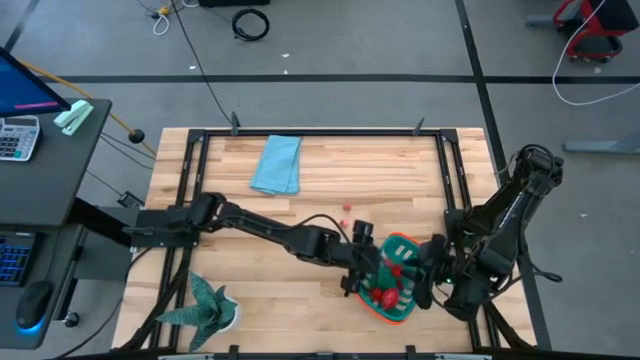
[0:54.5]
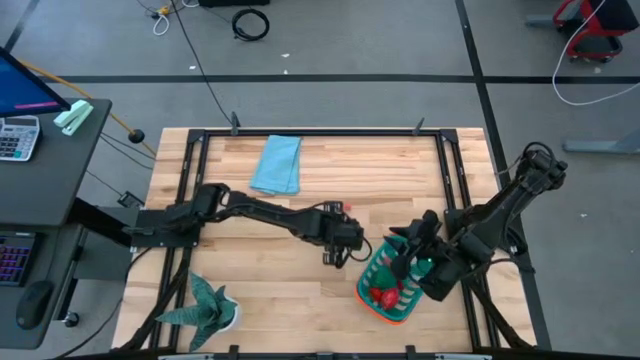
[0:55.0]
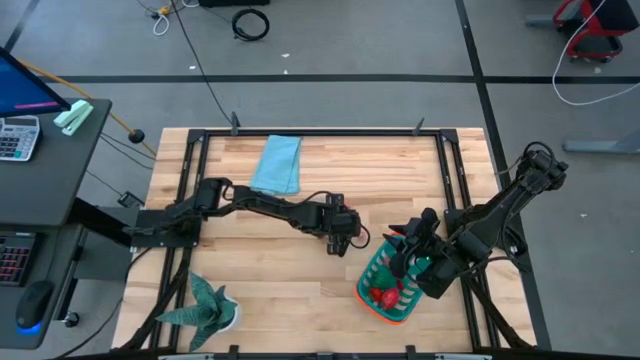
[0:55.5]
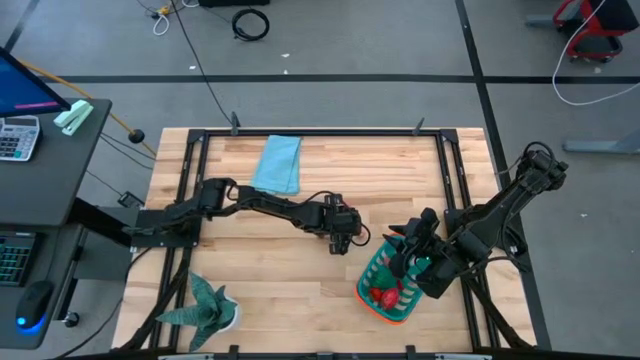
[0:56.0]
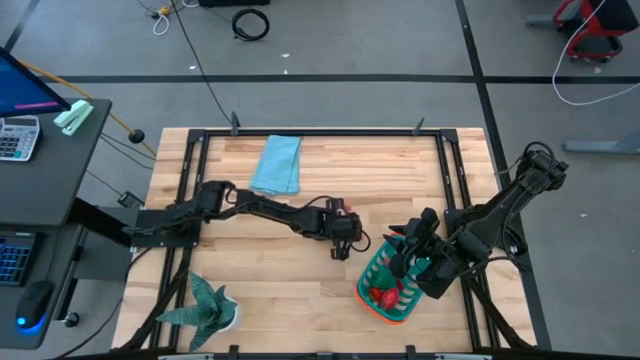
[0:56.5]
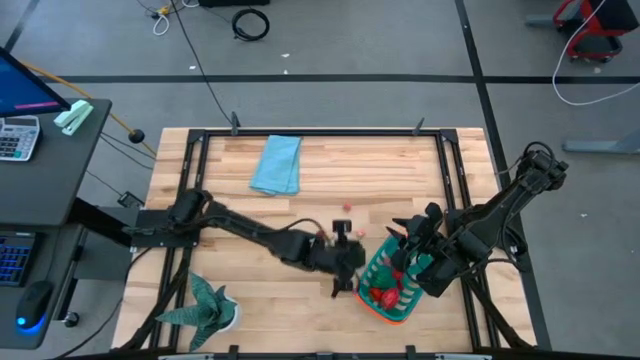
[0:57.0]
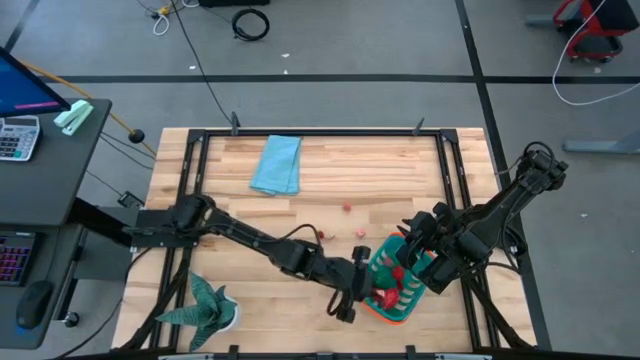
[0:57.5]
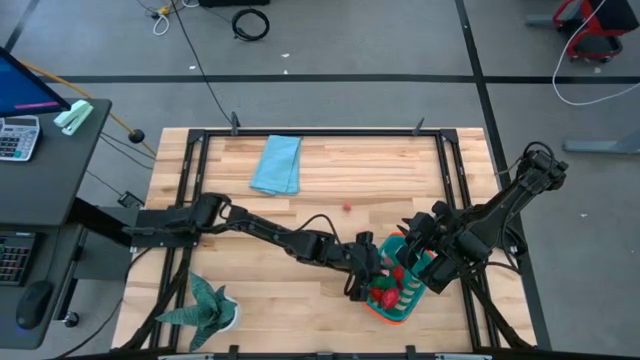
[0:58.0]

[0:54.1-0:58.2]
Task: Pick and placing Produce into tupperware
Put the pink peach into the blue basket

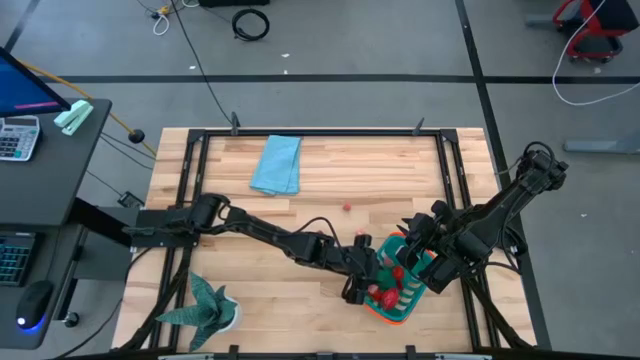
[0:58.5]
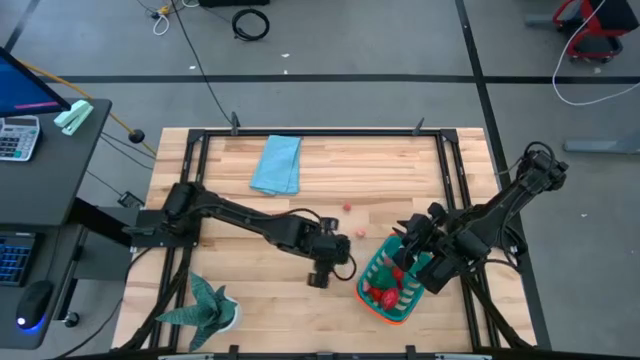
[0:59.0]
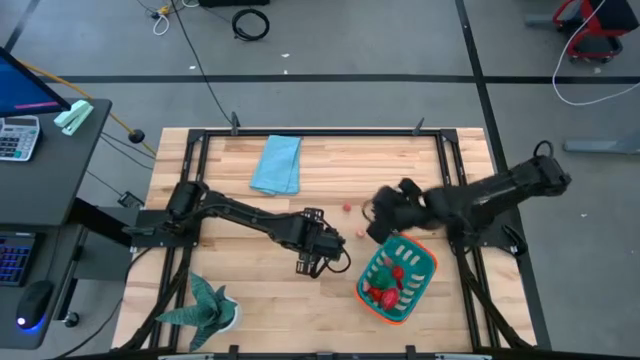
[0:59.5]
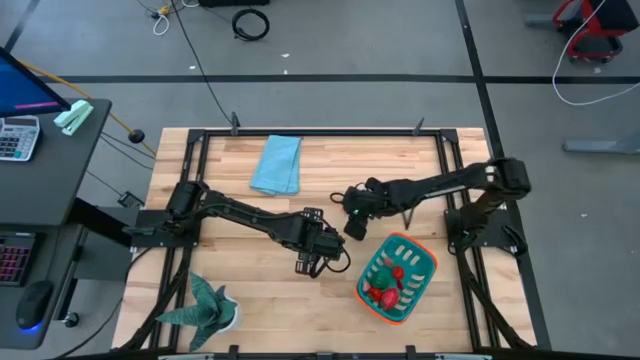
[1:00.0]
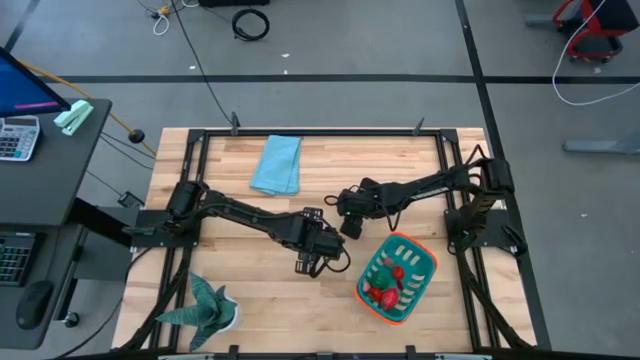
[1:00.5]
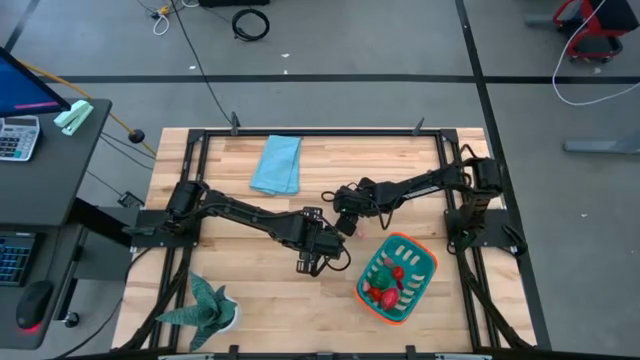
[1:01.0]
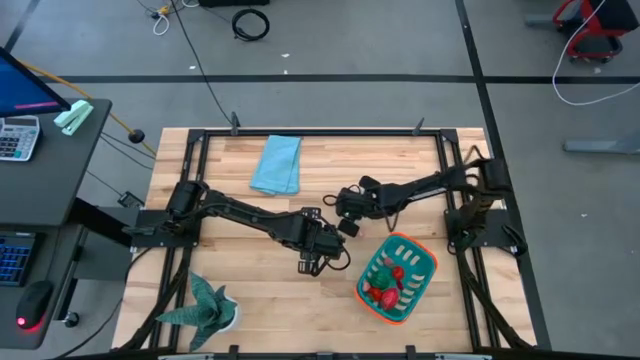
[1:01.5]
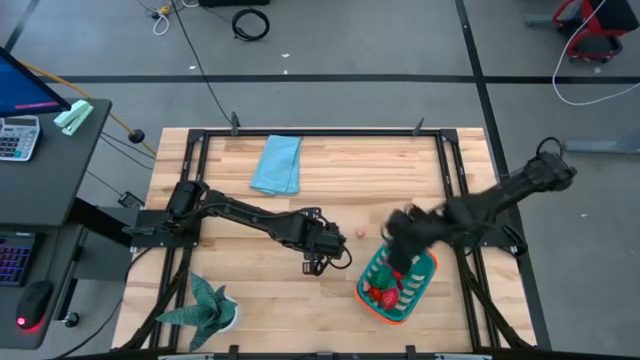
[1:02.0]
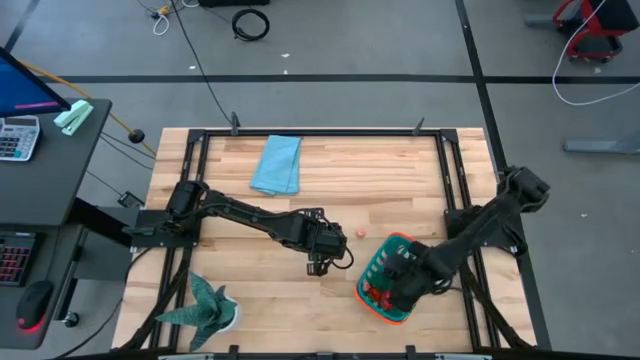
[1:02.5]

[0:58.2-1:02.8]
Put the pink peach into the blue basket

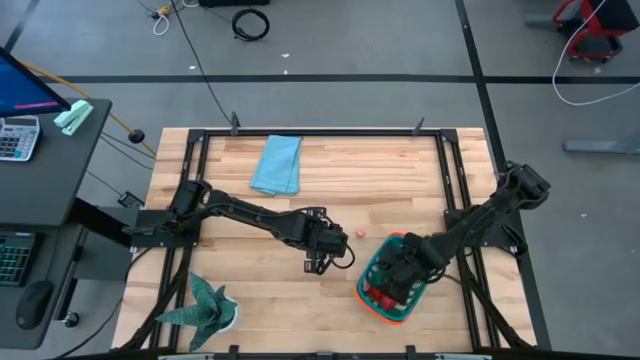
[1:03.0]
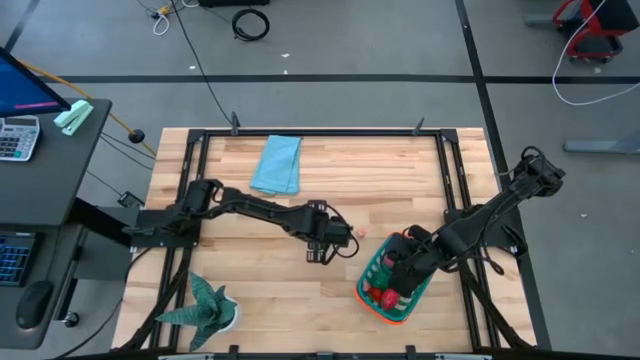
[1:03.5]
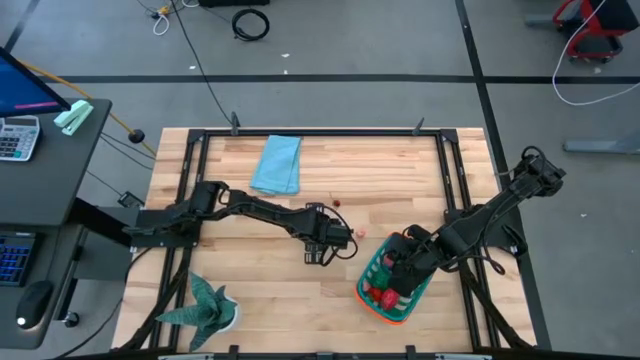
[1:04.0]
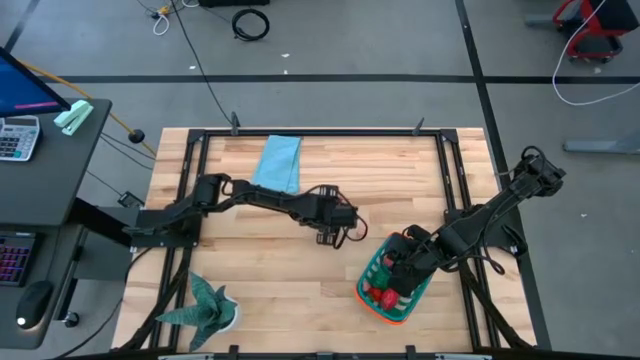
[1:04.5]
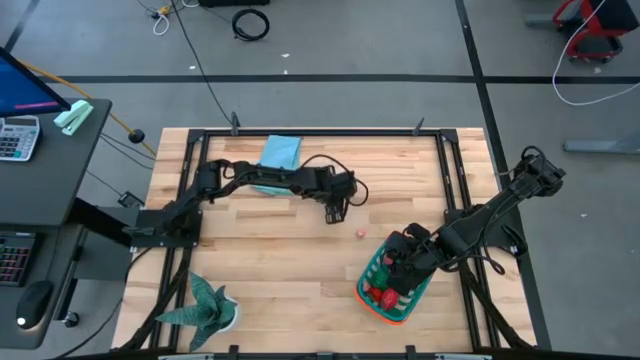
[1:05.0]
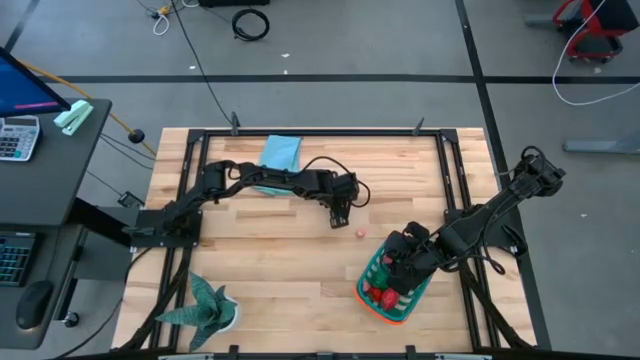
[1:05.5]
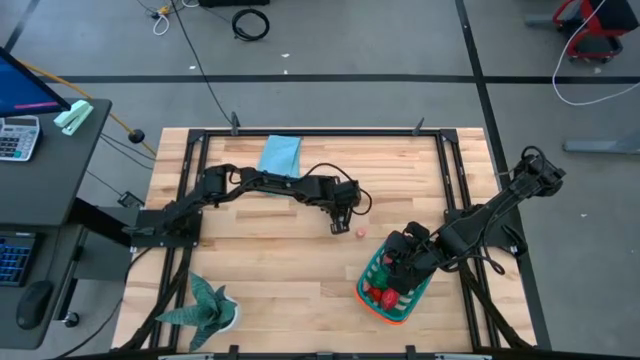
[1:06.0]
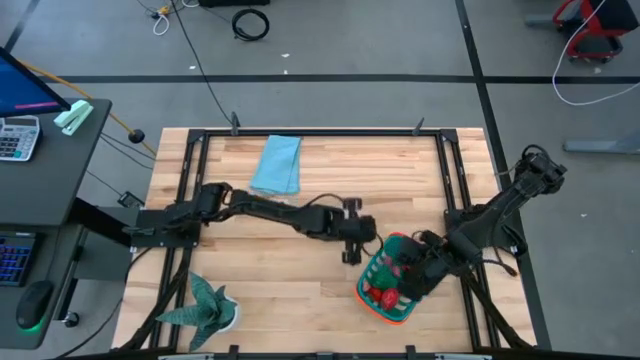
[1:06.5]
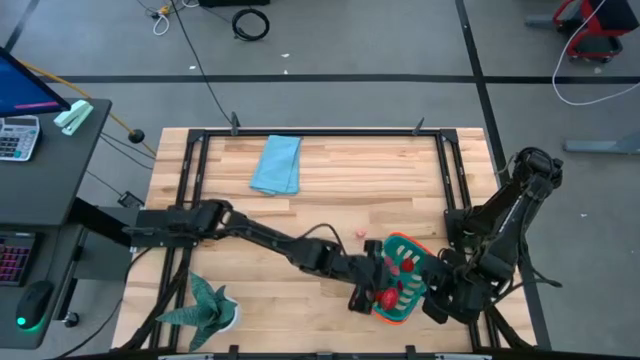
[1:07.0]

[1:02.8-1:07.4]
Put the red cherry into the blue basket

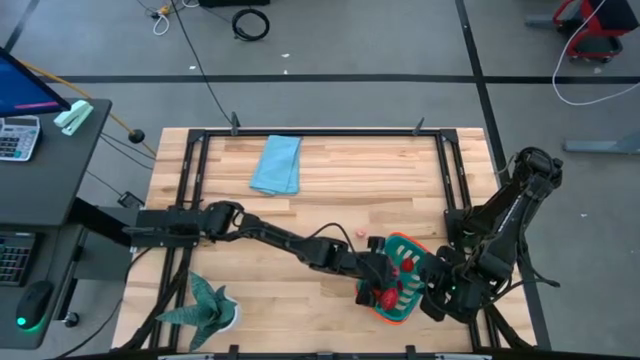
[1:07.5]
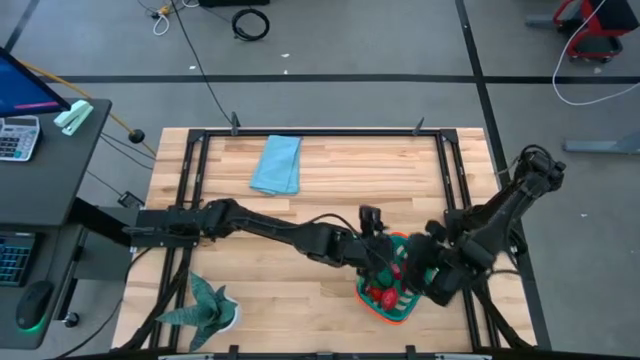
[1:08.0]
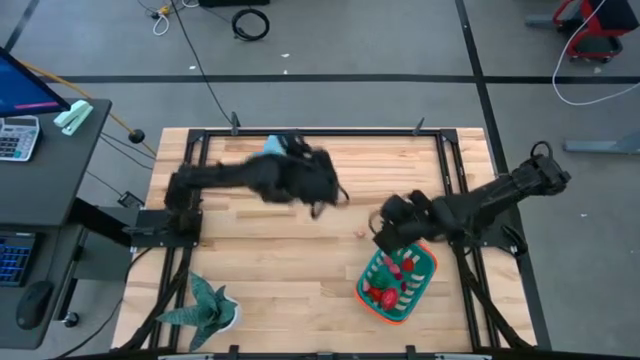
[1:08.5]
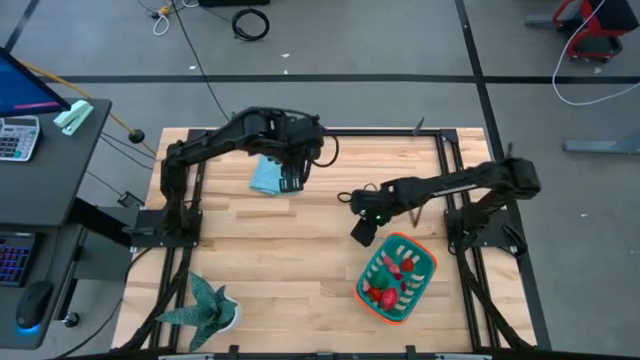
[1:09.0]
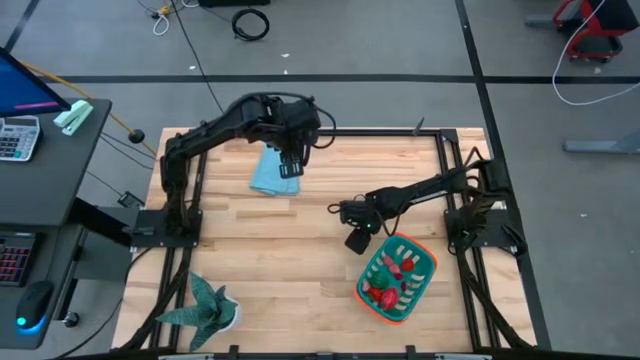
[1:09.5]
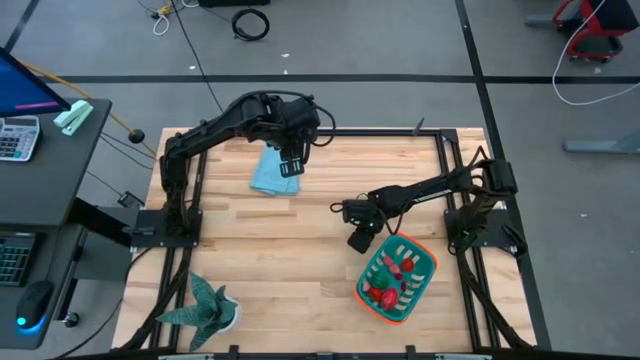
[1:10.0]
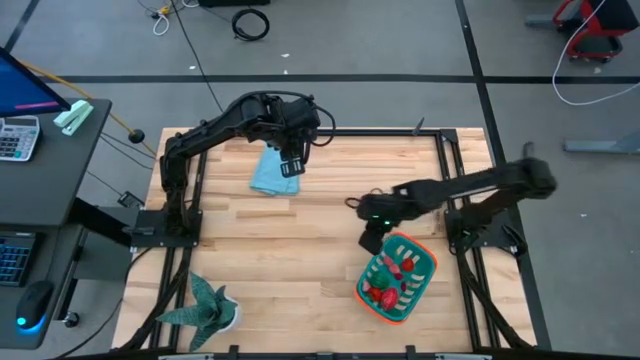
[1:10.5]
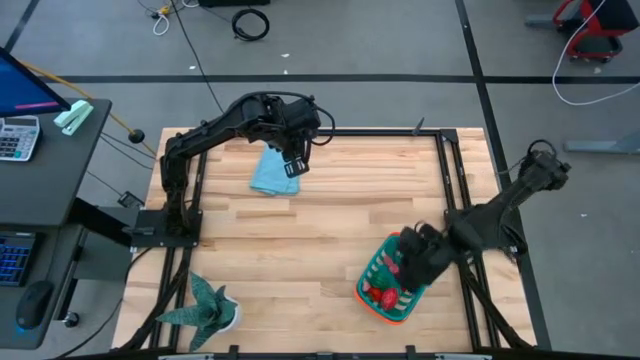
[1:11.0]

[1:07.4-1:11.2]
Put the pink peach into the blue basket

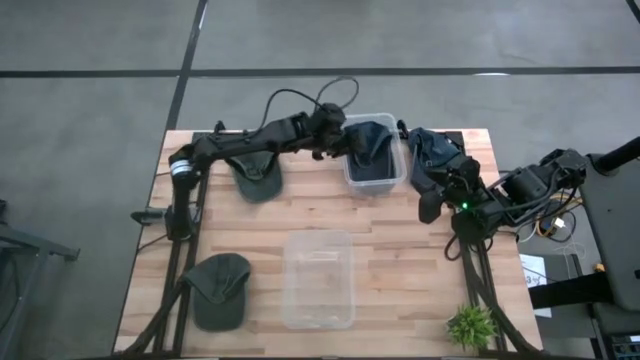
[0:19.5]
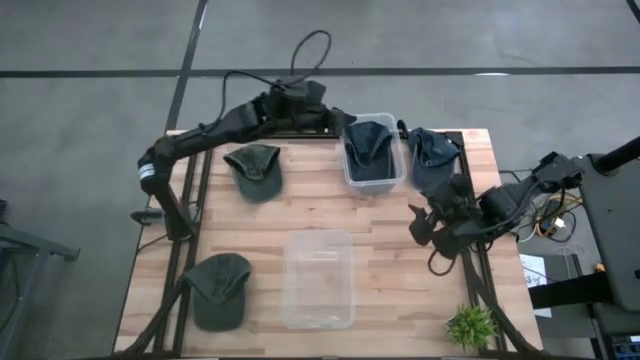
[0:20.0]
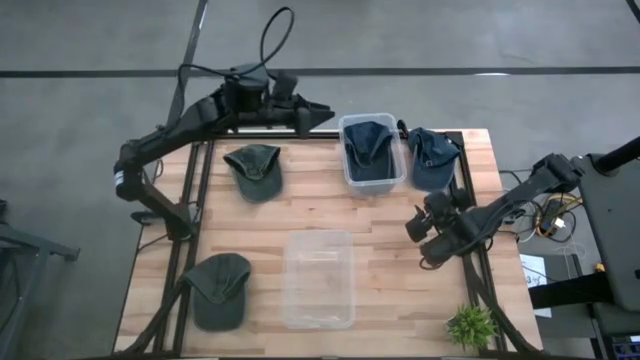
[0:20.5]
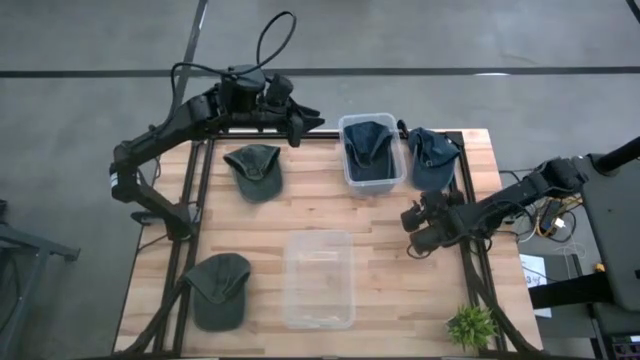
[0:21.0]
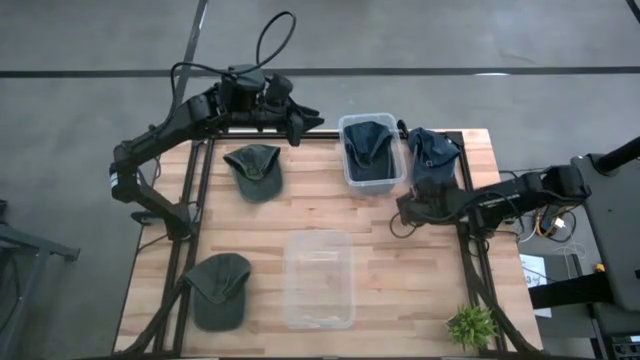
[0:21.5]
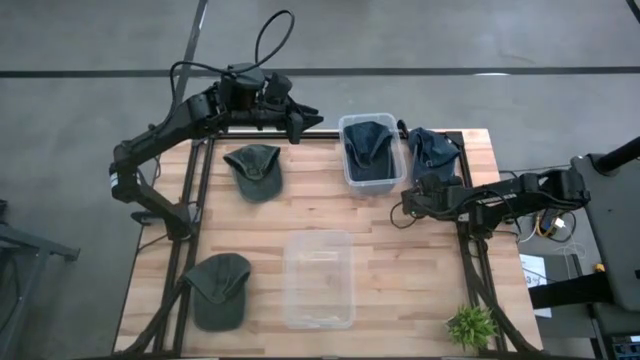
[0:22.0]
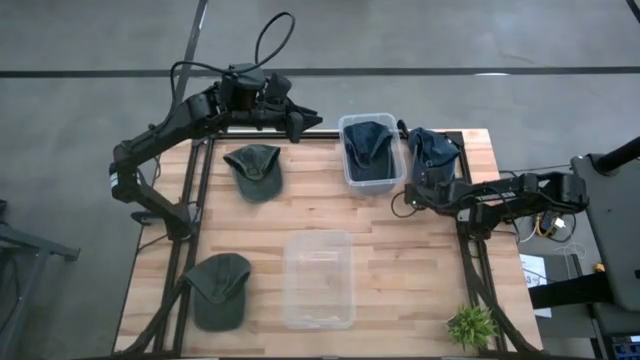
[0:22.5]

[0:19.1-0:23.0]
Task: Pick & Place hat
Put the blue cap into the top transparent bin
